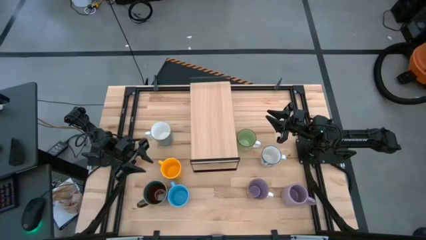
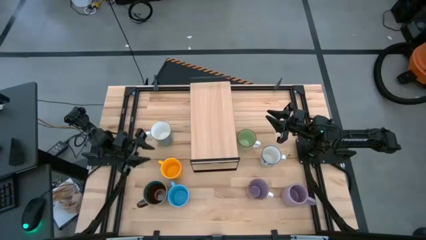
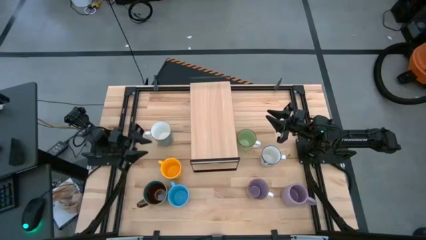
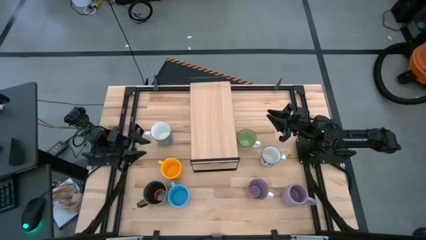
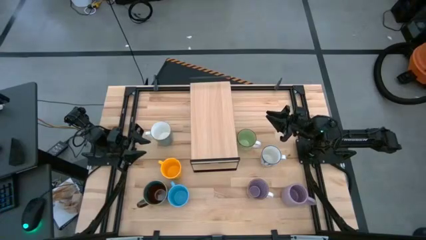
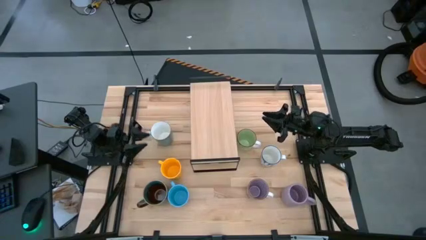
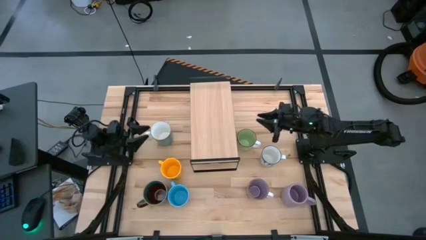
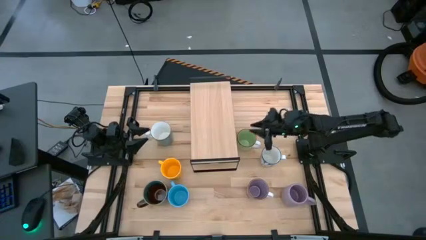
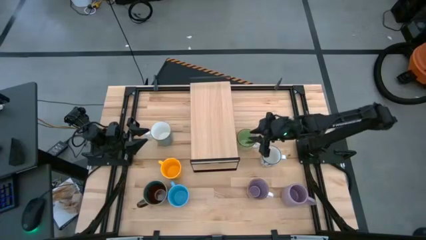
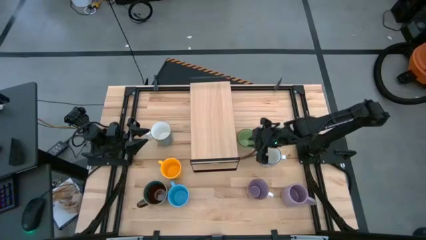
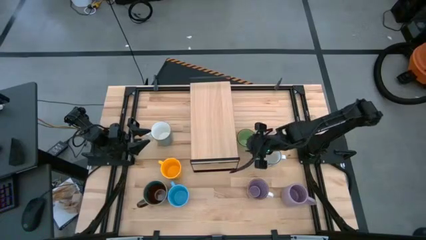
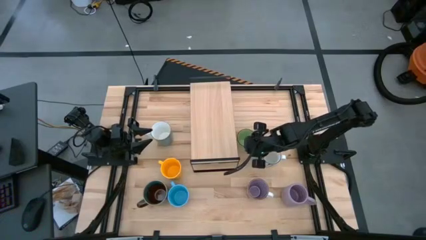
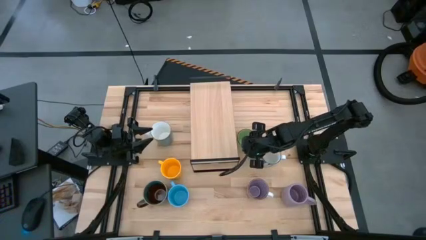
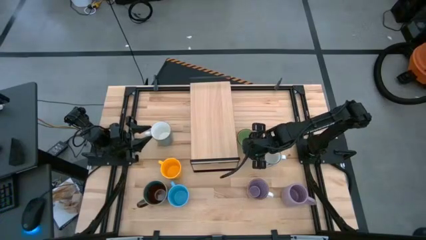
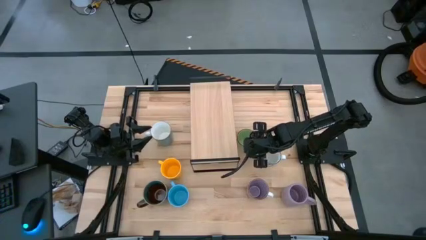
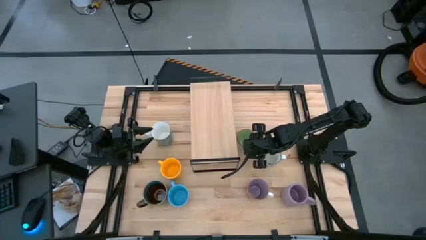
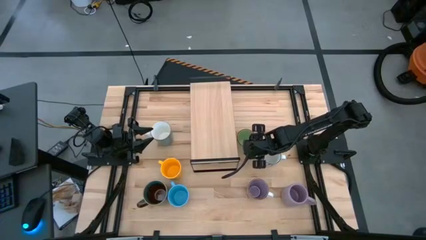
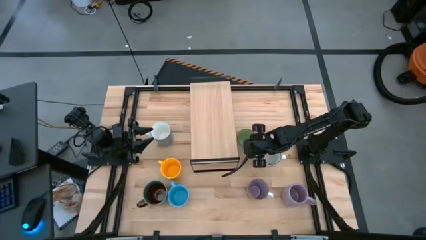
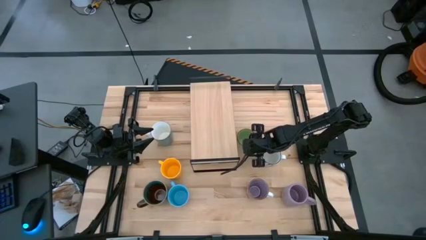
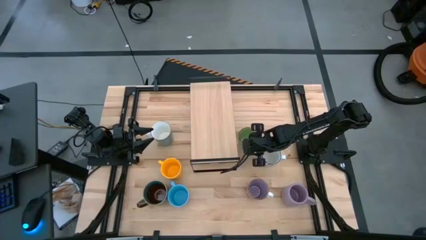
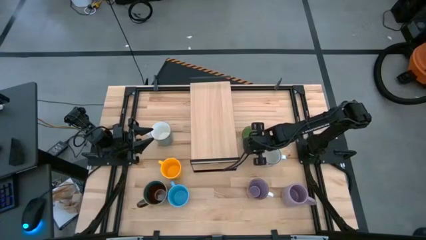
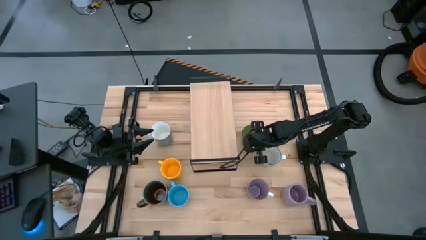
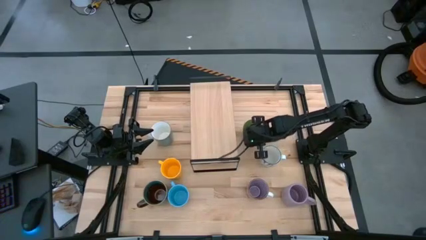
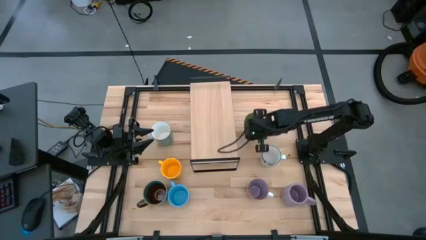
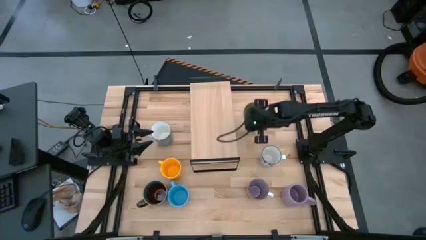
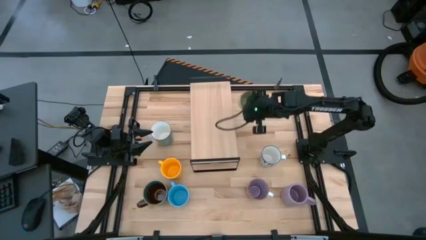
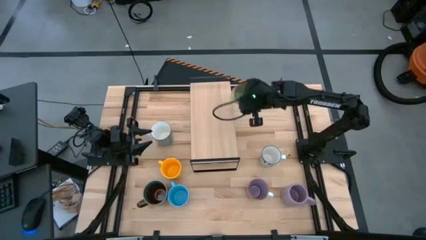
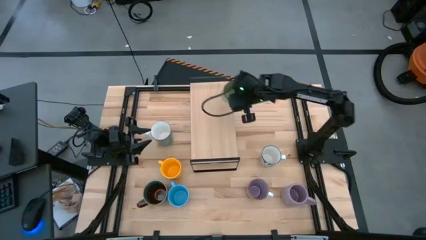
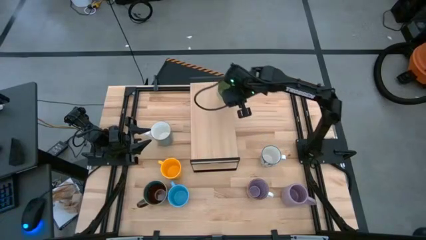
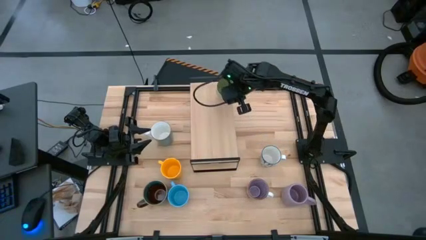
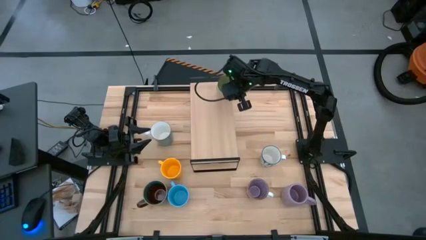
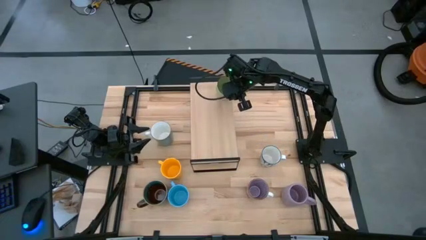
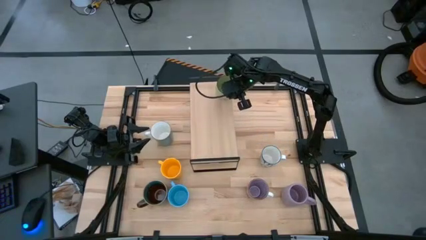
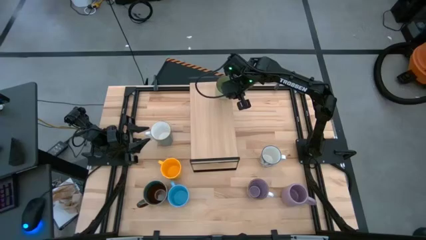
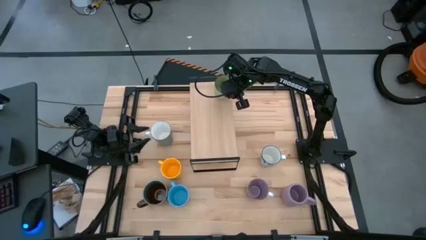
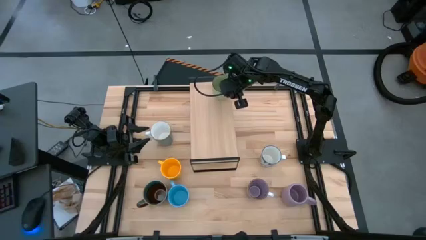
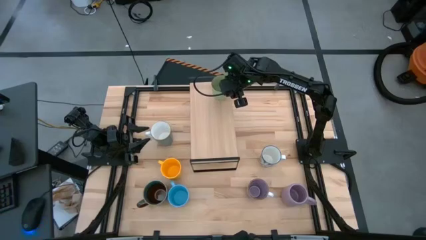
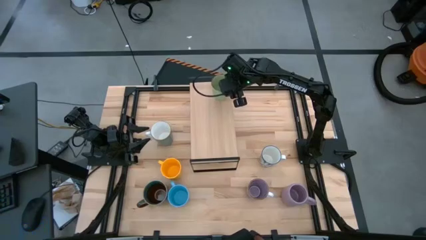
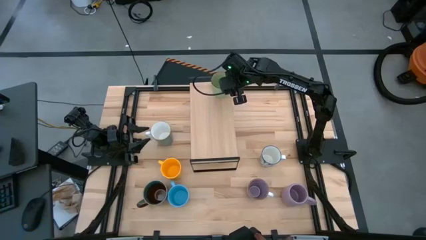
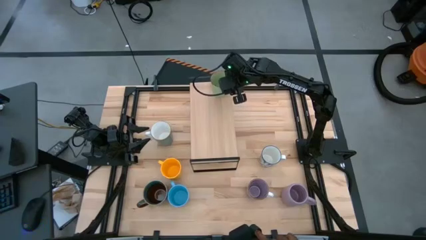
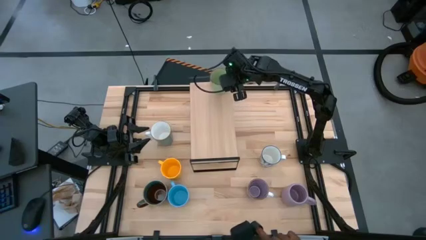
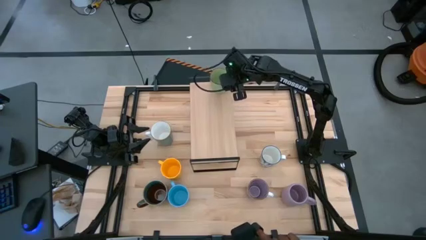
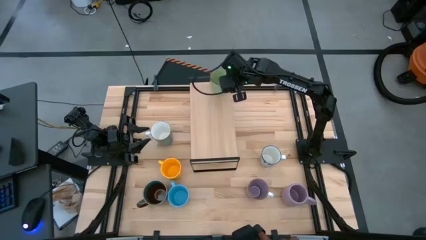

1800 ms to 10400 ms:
Task: Place coffee mugs
Put the light green and white mug on the shelf

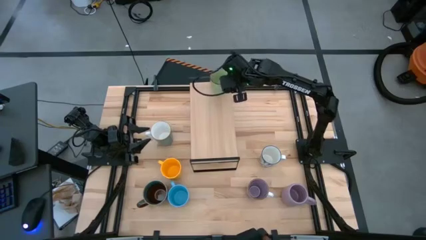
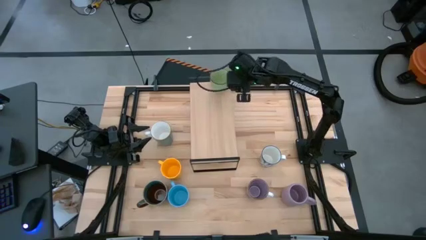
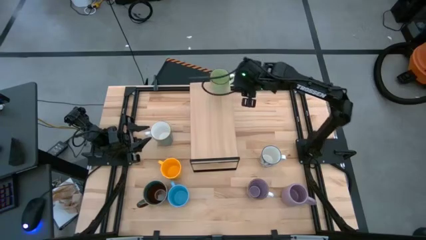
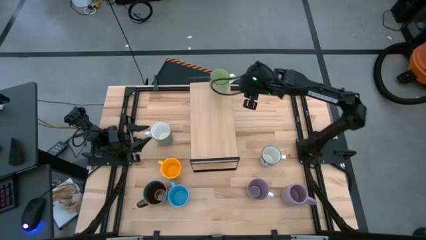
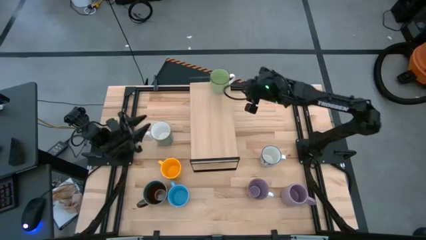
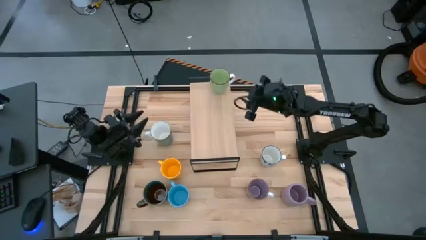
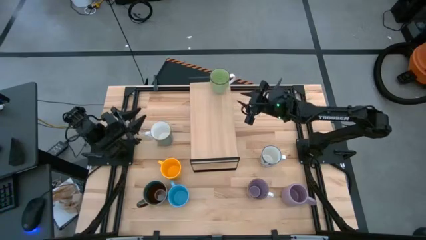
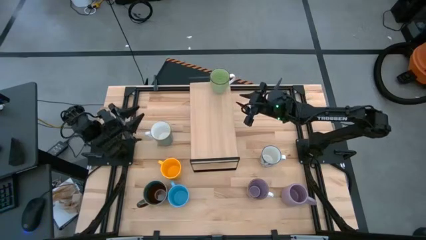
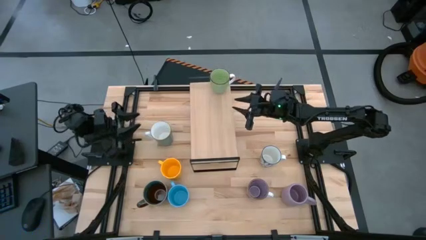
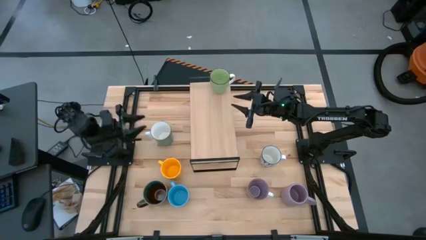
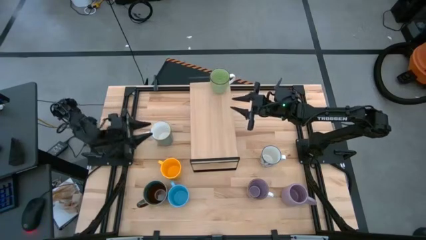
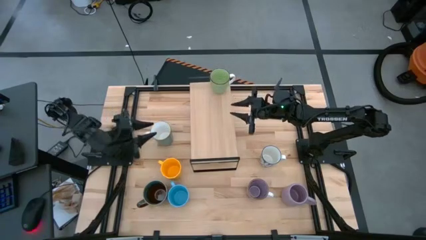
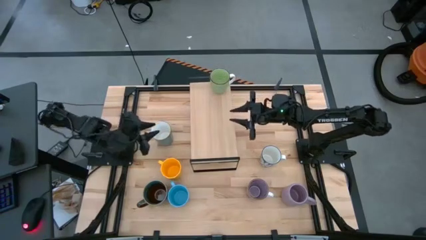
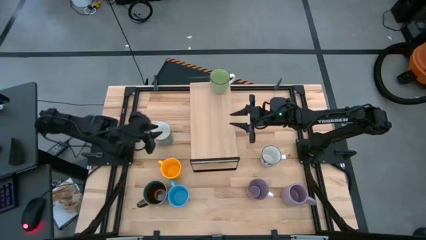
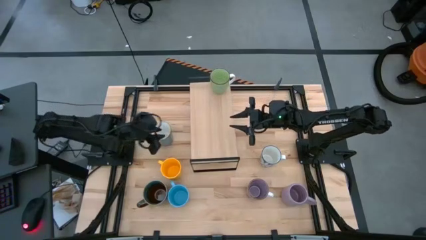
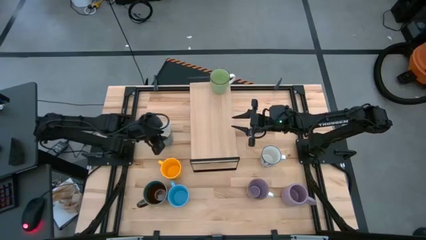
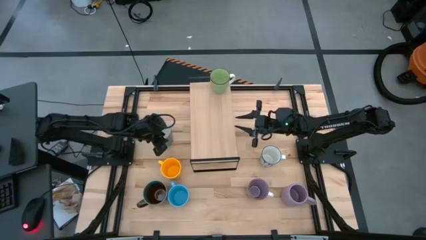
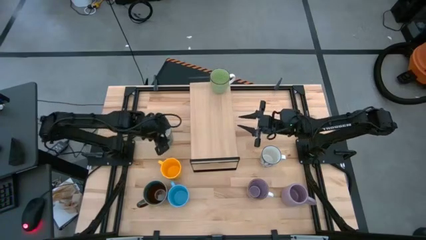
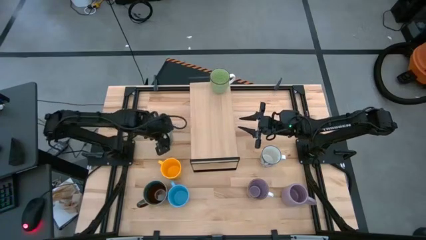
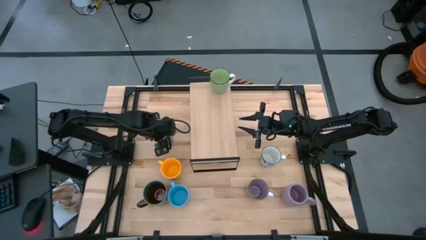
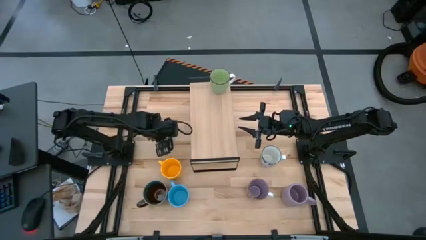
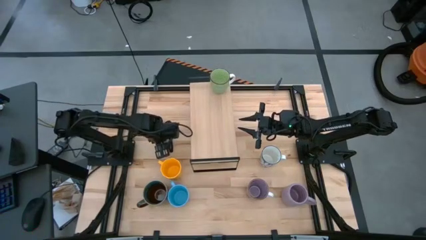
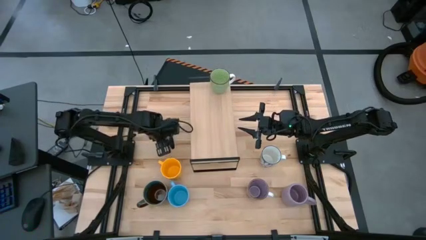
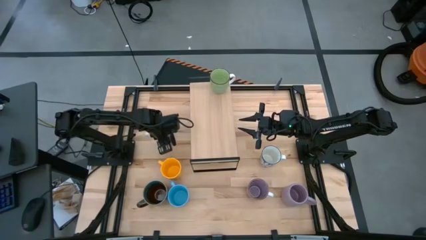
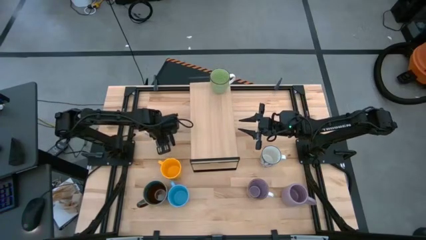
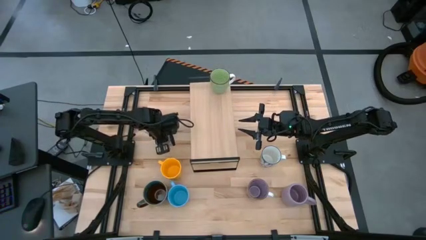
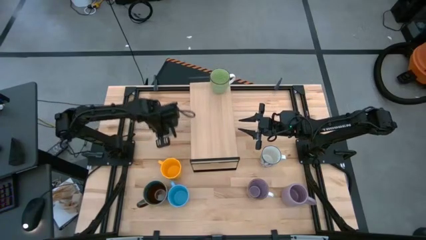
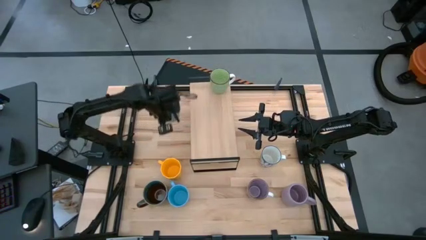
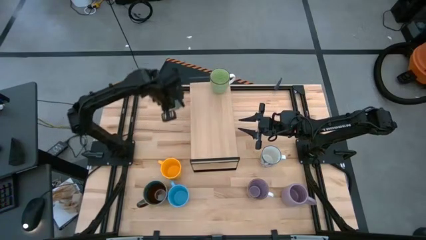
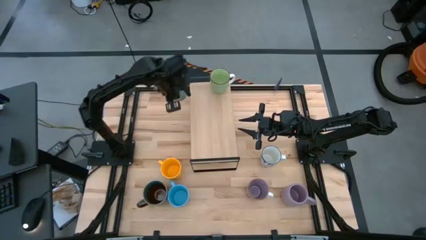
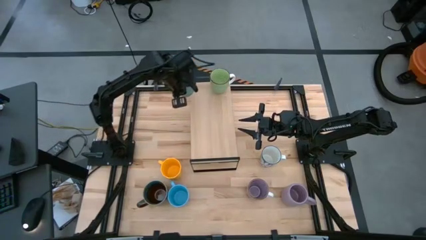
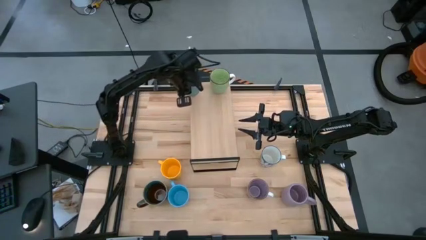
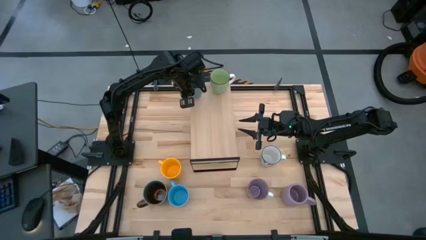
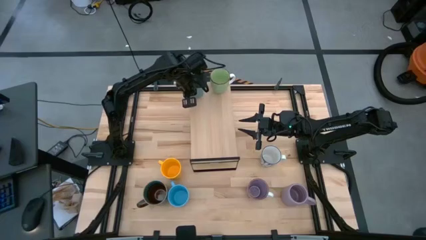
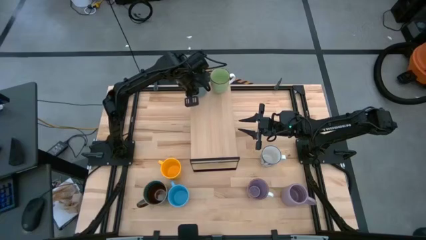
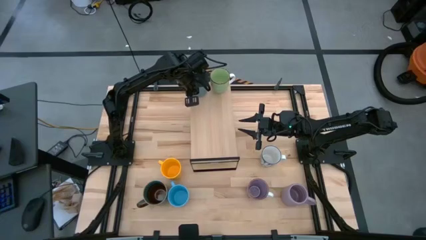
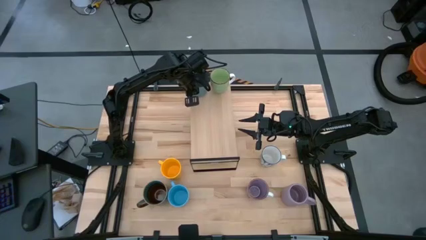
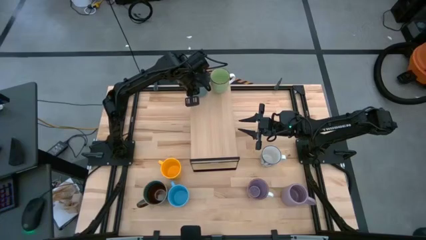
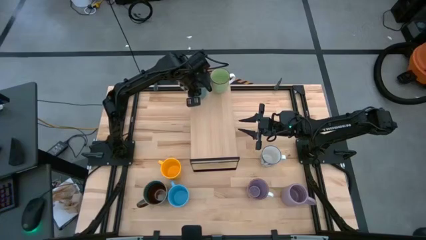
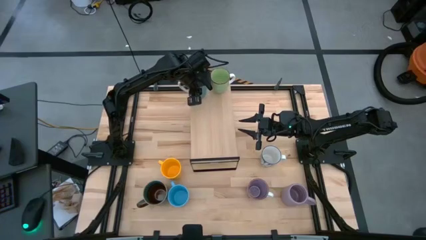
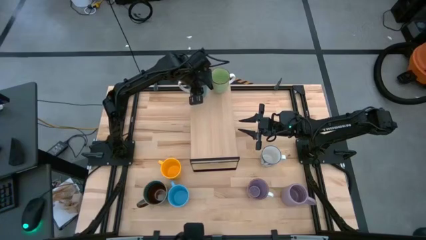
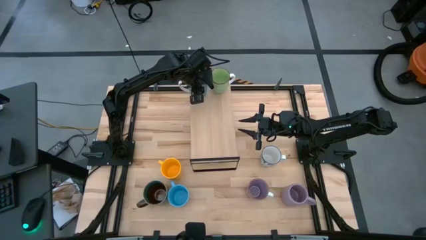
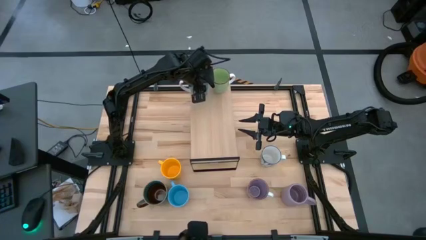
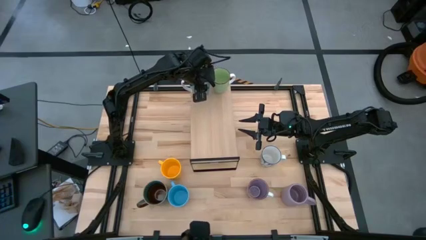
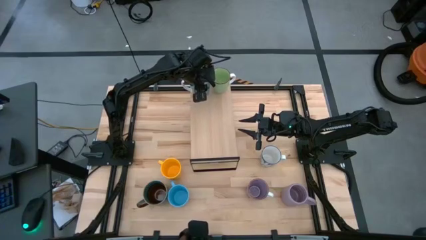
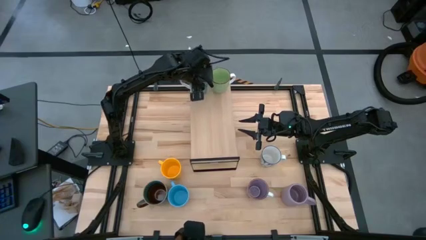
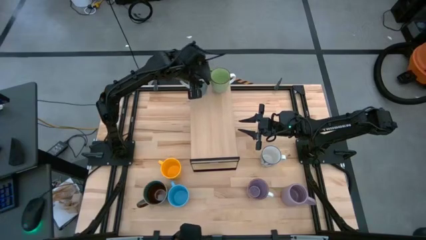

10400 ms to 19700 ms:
Put the light blue mug on the shelf aligned with the light green mug
